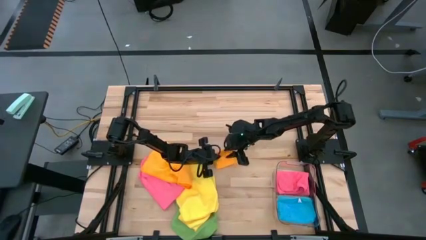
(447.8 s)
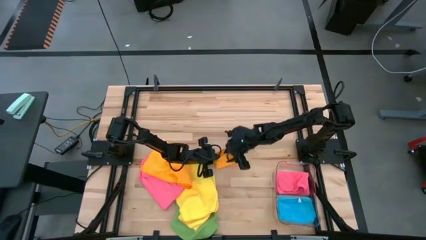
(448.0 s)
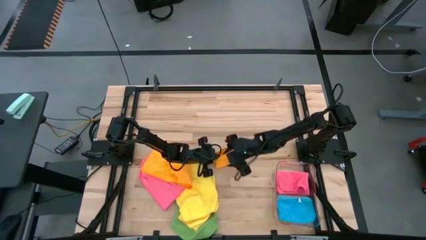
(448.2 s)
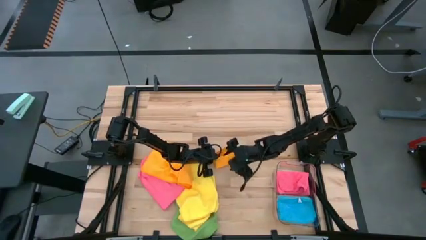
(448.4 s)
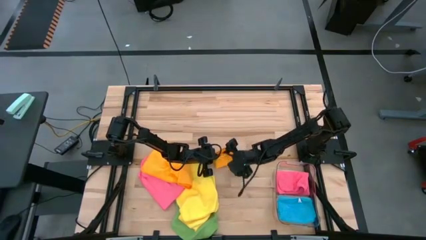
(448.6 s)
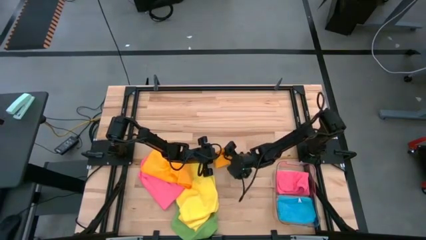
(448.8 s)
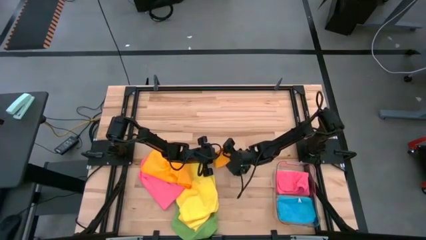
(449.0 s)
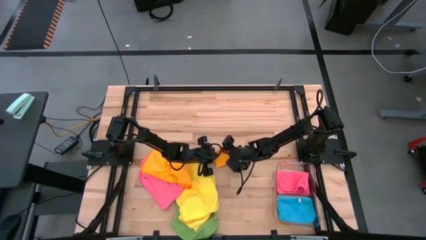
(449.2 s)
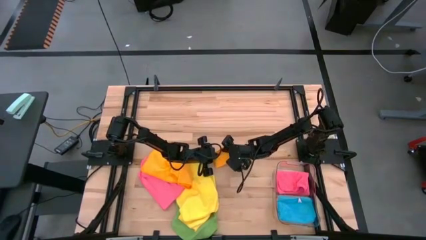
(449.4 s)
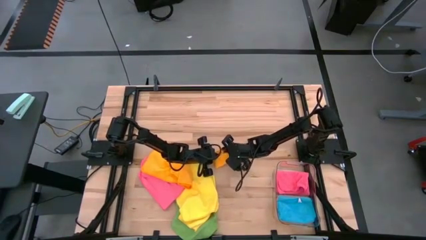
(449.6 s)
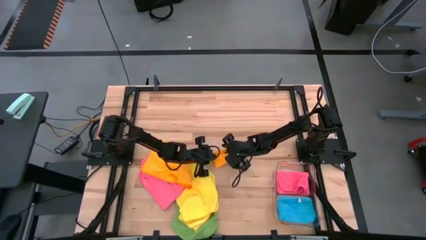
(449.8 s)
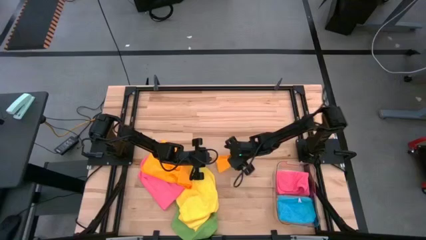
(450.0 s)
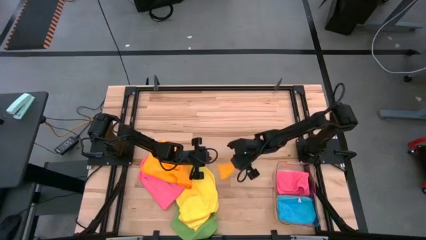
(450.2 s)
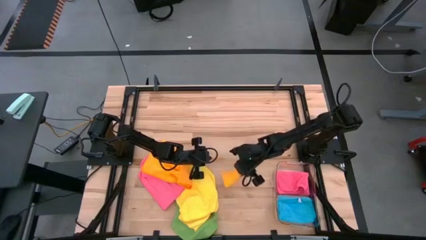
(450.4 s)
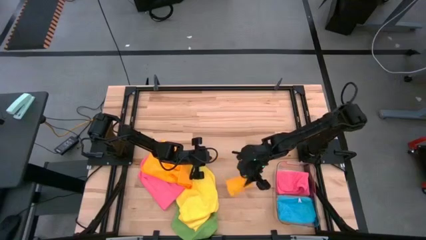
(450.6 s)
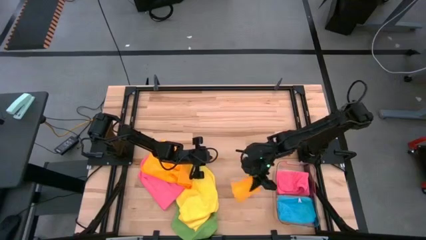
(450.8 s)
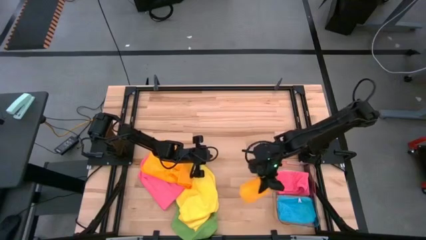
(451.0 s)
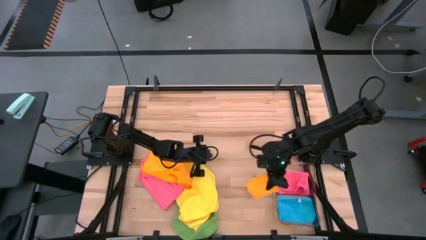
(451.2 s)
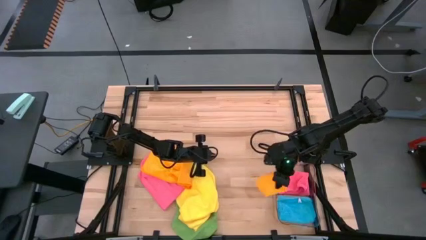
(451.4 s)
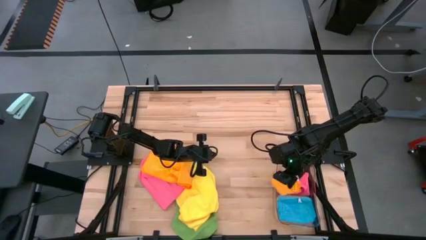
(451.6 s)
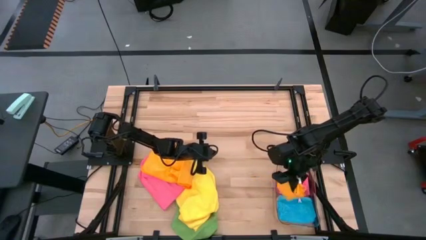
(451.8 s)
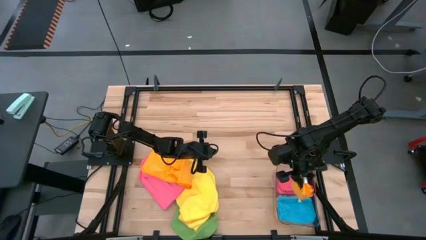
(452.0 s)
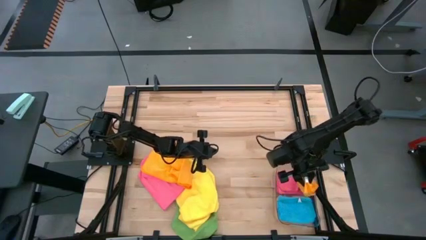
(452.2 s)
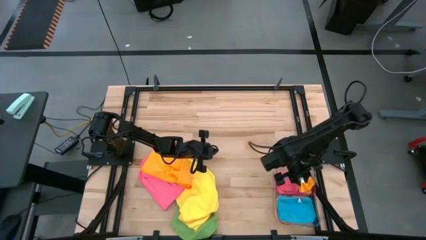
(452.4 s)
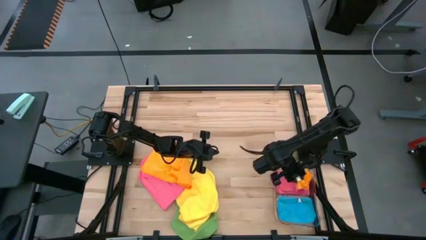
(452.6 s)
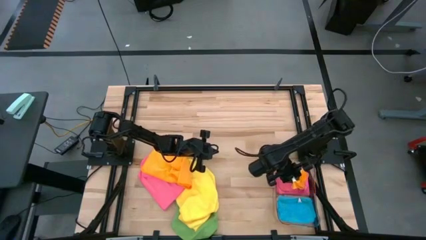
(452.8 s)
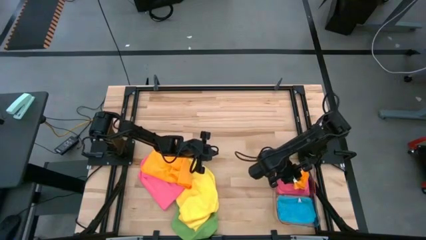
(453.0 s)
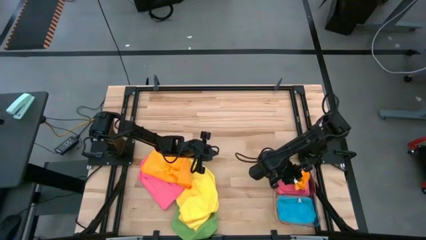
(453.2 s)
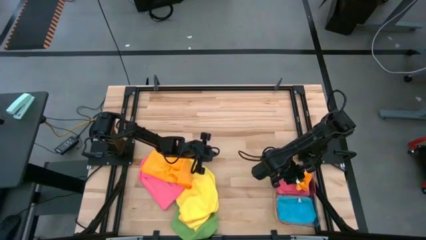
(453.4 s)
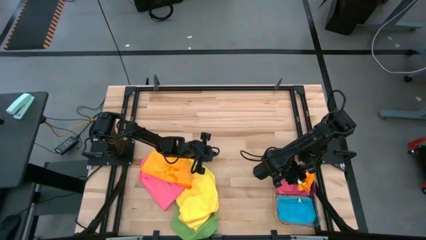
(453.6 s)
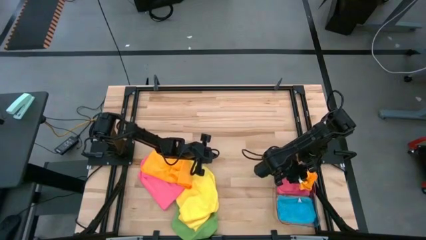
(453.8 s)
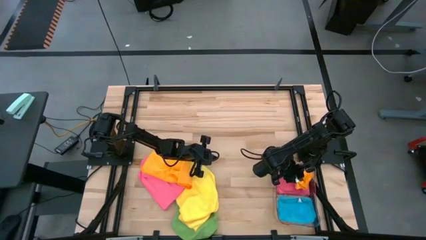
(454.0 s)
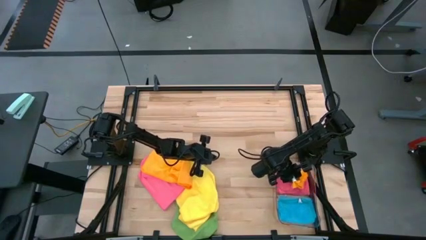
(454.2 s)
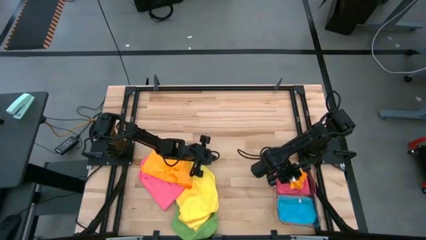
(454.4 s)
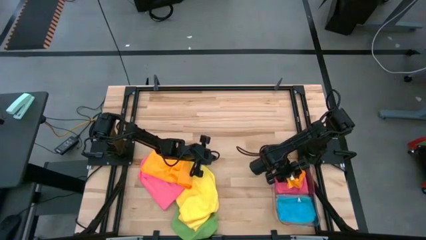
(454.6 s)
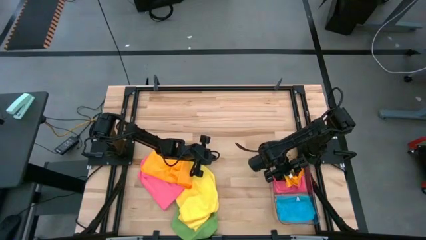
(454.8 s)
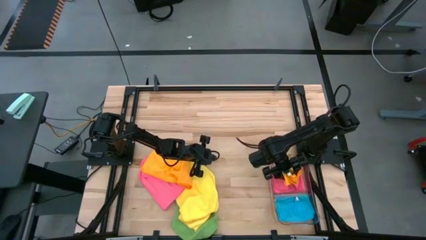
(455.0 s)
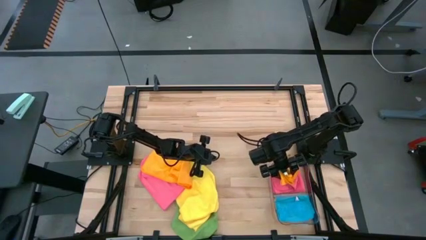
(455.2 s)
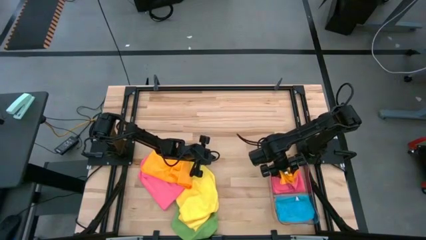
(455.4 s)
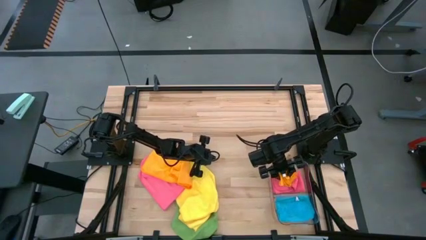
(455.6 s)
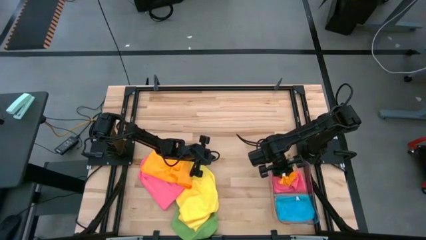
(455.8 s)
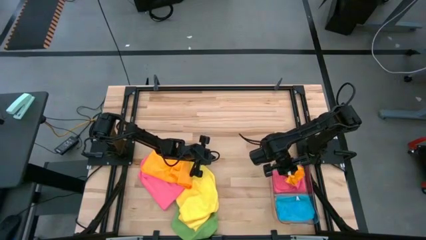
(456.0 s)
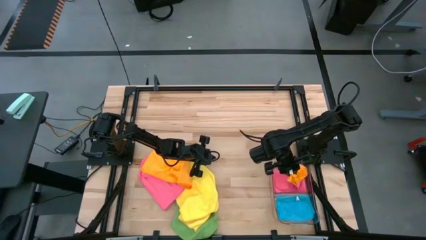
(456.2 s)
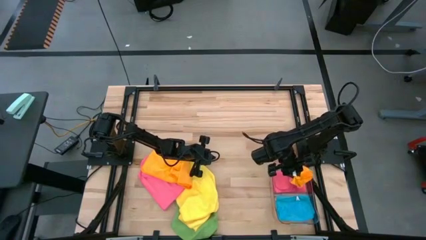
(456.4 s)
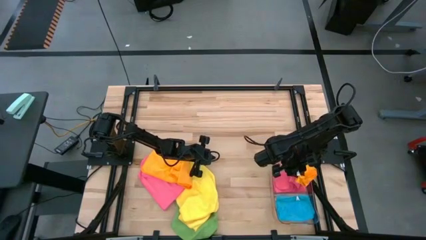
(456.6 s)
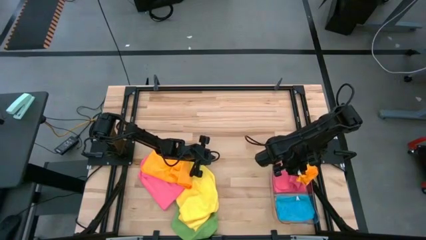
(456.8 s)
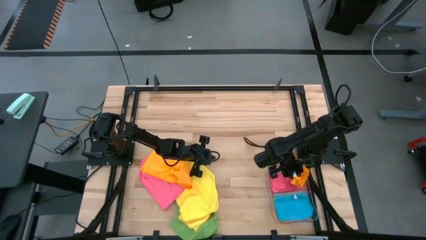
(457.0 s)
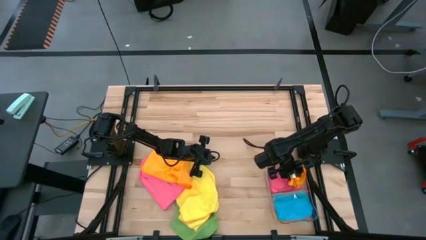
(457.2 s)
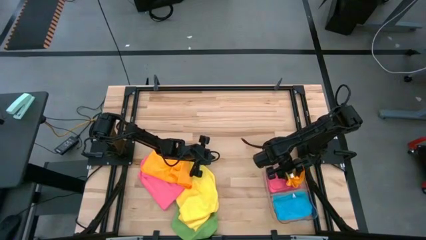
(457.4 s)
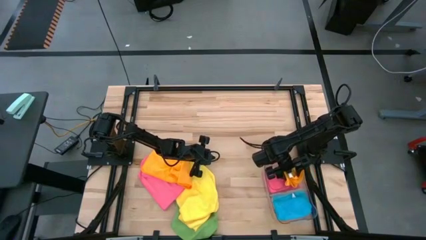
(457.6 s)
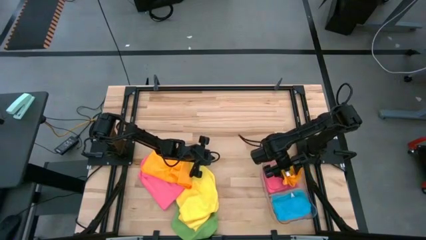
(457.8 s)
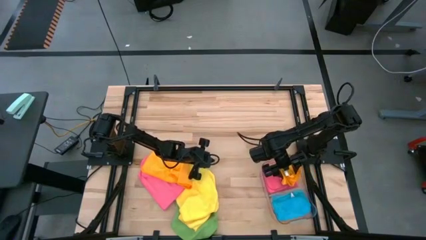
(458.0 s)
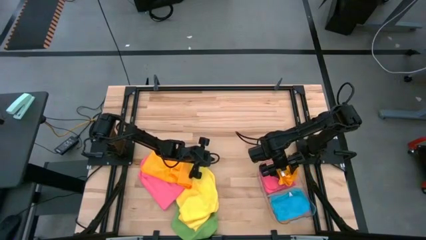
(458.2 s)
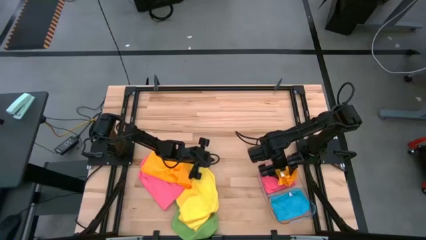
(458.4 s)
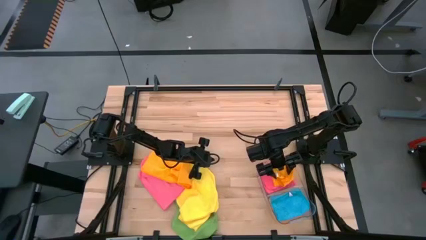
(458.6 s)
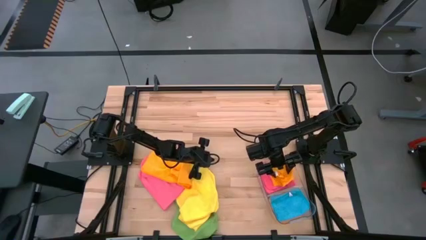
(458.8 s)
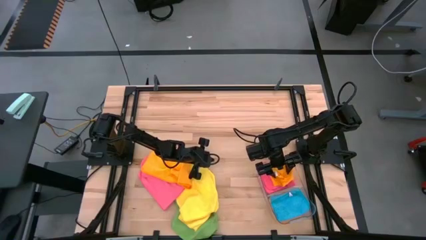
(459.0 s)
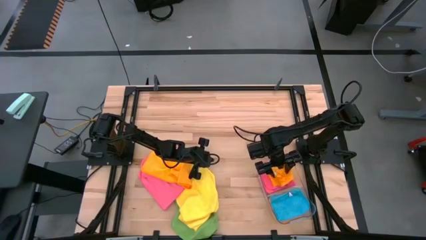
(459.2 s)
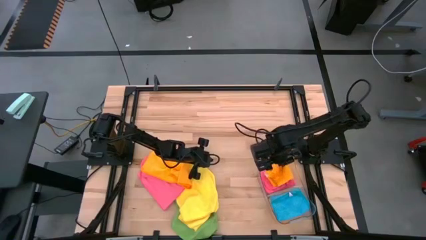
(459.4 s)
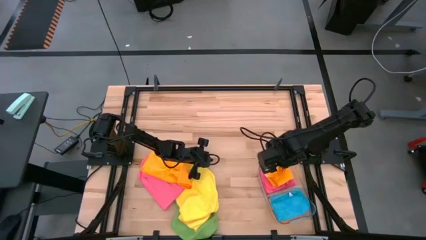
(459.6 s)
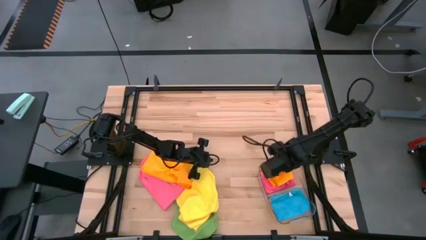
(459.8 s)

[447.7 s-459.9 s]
Task: Fold microfiber towels
Put the folded orange towel into the transparent bin

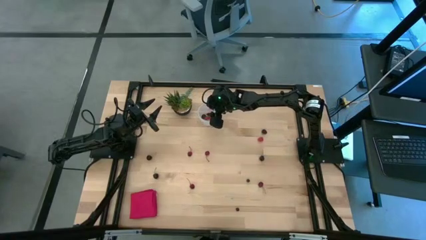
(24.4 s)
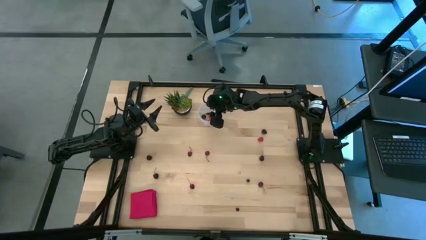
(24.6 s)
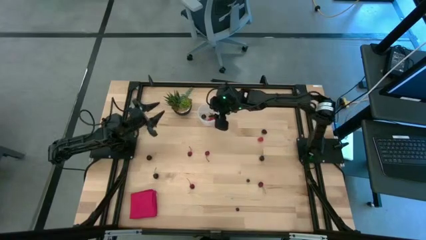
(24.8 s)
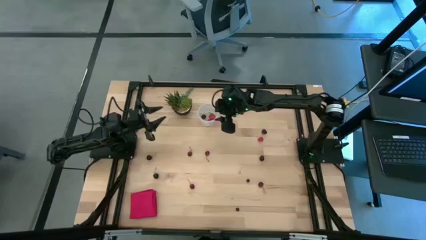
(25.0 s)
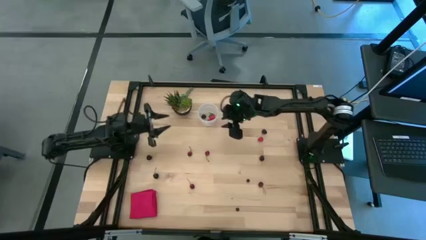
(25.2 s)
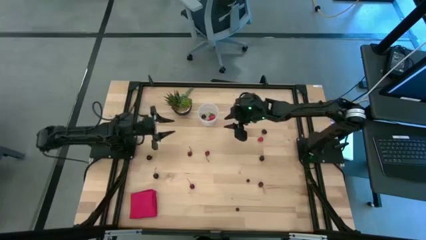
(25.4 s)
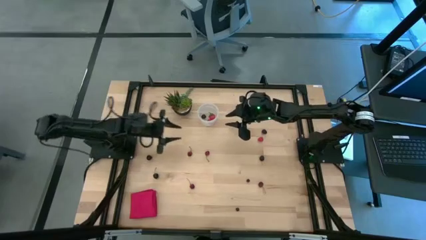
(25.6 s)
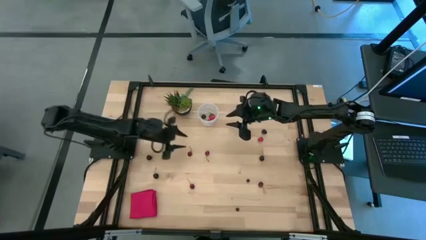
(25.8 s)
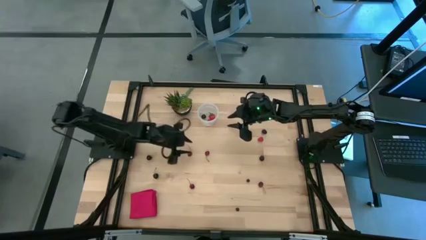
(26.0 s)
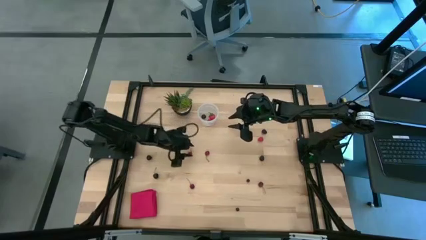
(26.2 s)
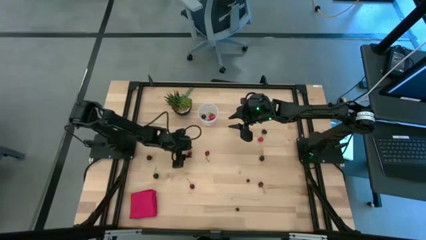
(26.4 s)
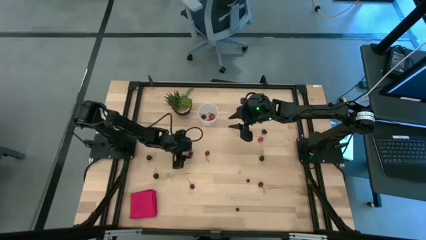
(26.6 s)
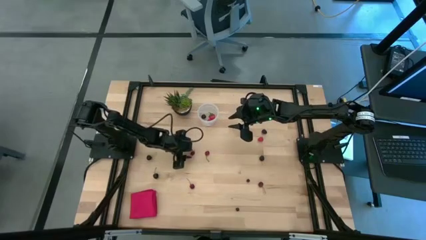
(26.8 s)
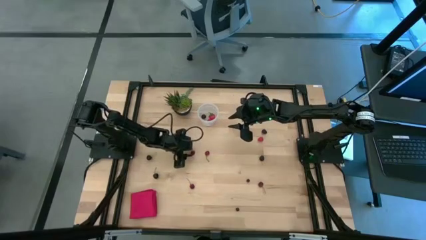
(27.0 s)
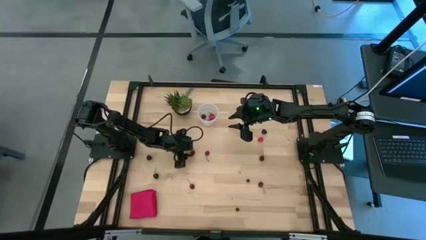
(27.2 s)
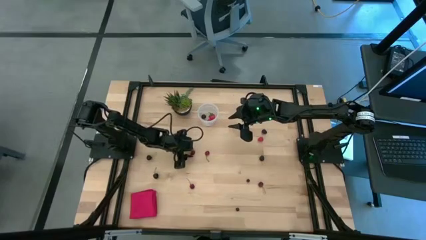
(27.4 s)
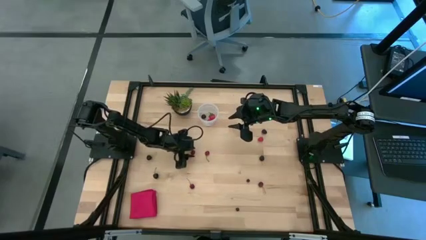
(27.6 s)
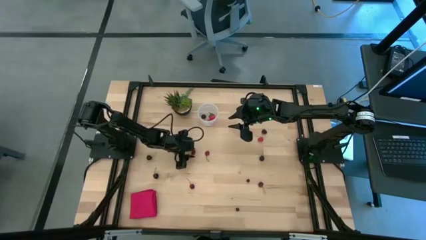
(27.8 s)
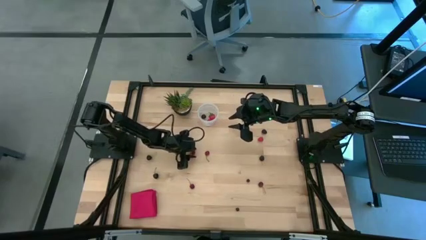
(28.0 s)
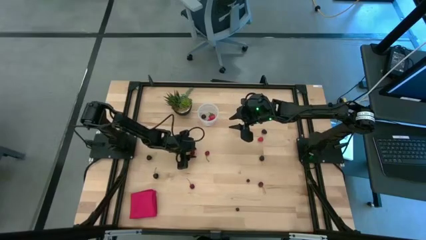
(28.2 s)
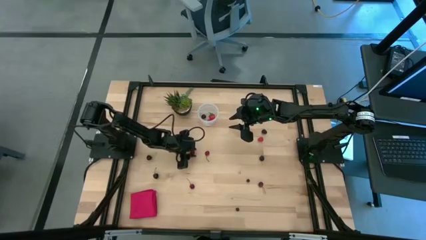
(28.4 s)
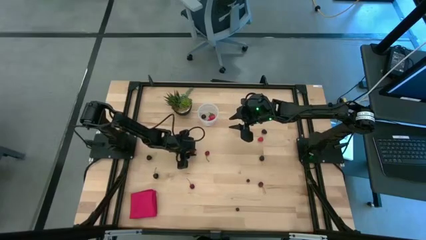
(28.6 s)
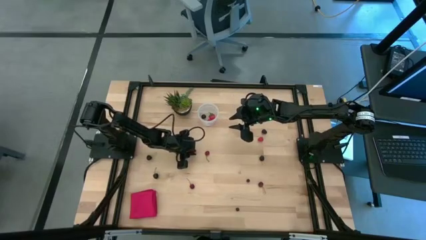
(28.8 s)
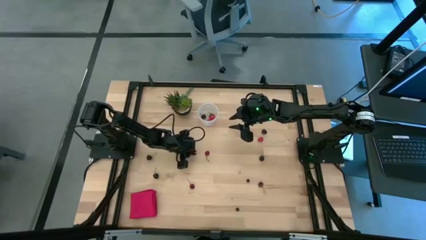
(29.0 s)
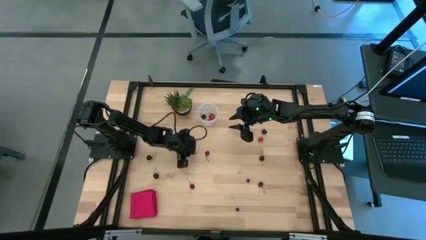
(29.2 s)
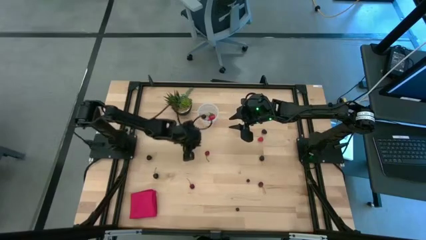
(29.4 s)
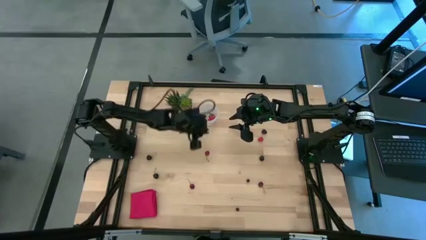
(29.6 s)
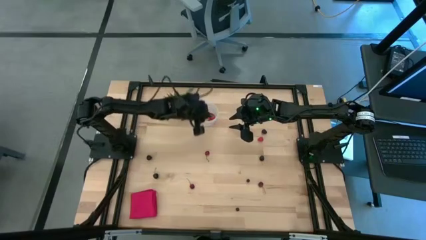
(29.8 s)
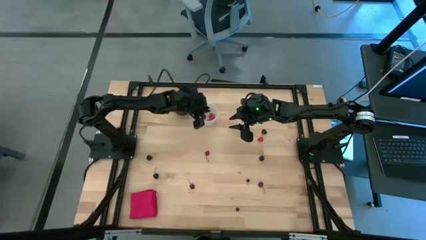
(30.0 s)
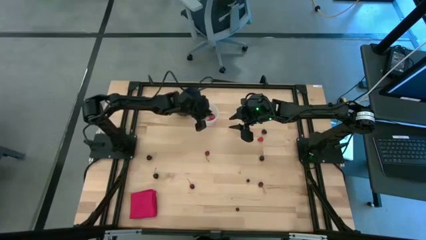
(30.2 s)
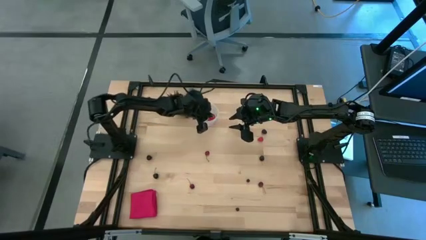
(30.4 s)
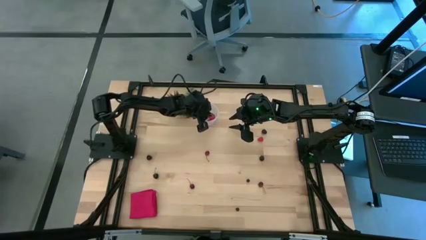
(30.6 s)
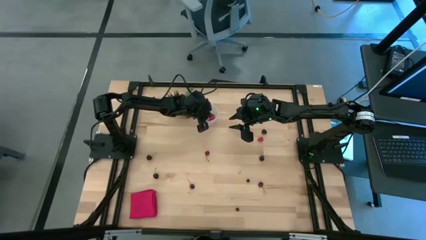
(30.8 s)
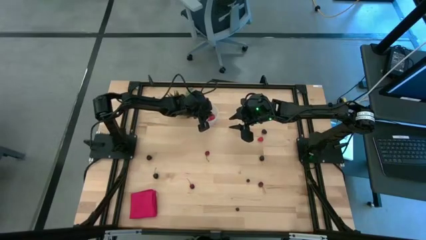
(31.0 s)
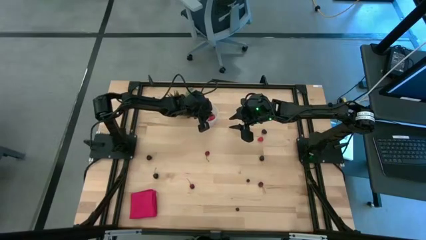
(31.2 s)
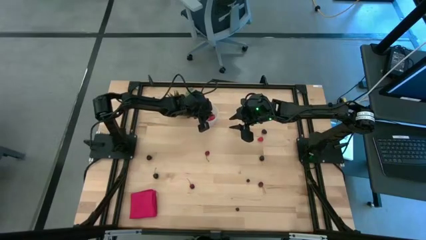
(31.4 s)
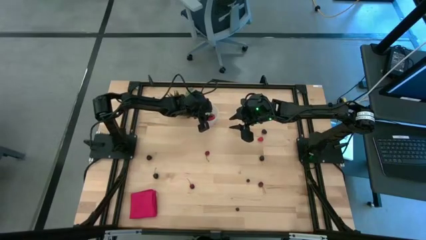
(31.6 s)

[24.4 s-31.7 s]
Task: Pick and placing Produce into tupperware
Put the red cherry into the transparent container
